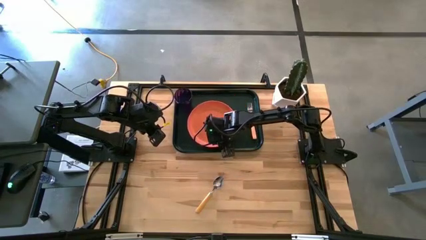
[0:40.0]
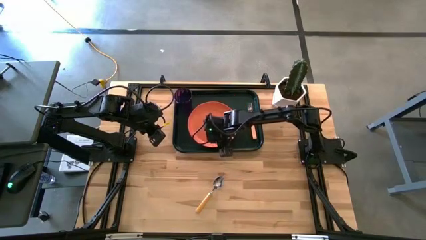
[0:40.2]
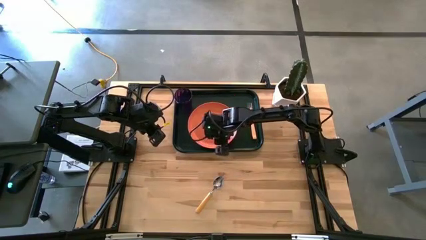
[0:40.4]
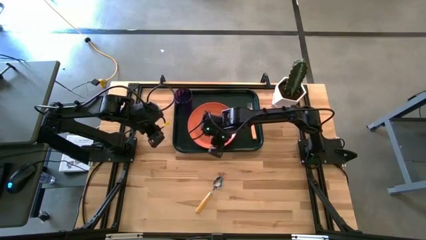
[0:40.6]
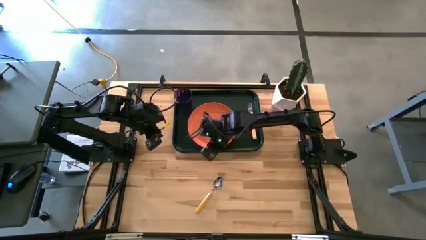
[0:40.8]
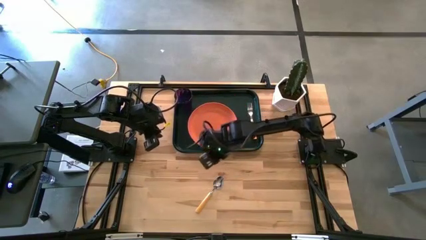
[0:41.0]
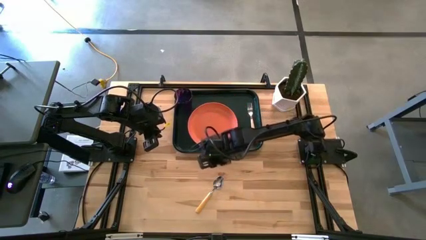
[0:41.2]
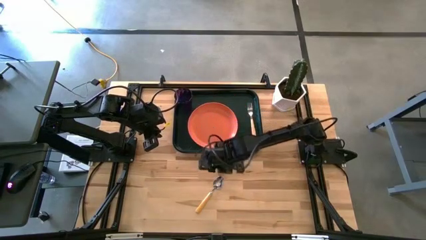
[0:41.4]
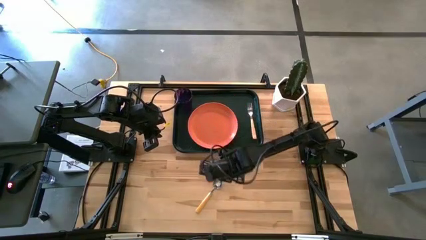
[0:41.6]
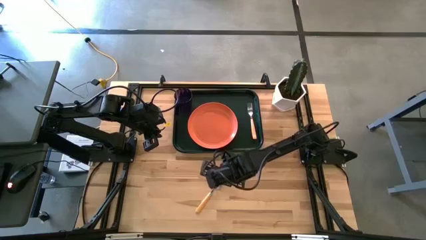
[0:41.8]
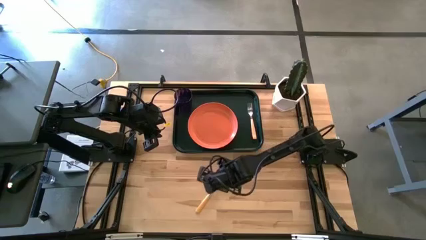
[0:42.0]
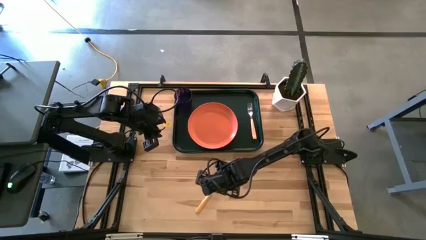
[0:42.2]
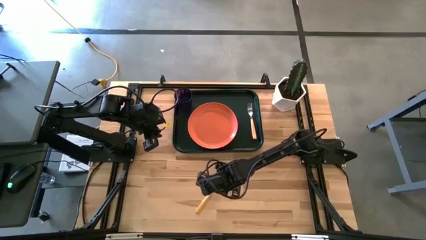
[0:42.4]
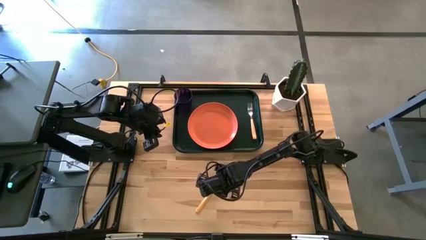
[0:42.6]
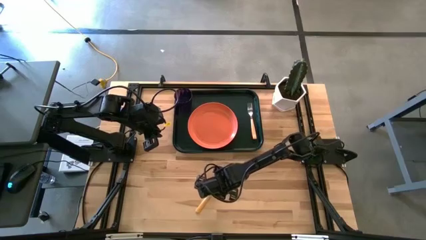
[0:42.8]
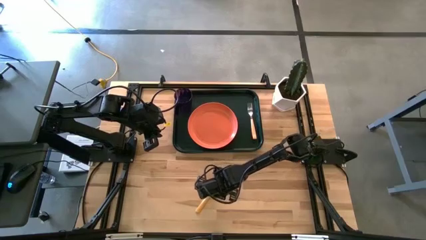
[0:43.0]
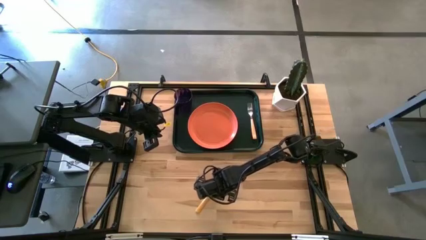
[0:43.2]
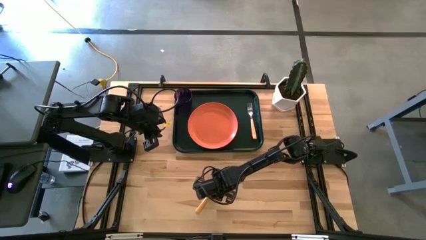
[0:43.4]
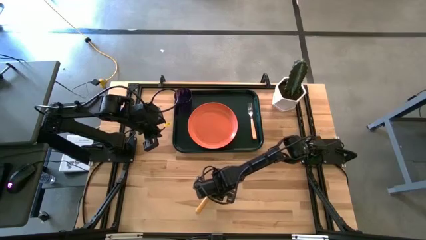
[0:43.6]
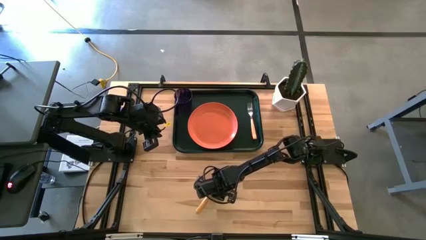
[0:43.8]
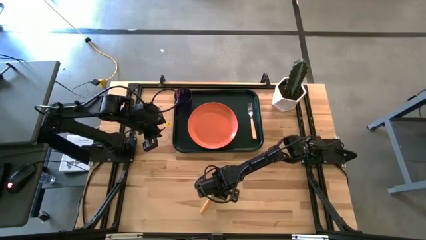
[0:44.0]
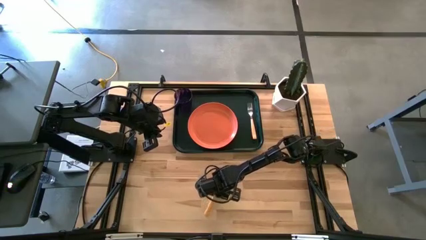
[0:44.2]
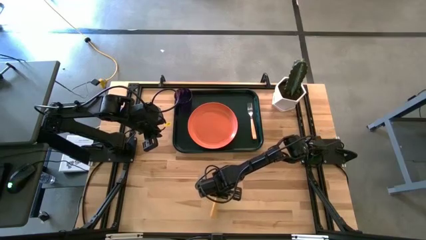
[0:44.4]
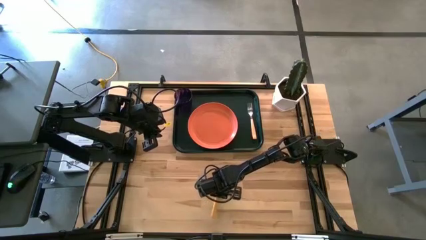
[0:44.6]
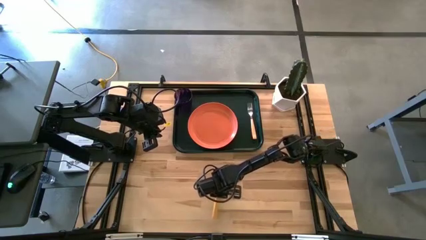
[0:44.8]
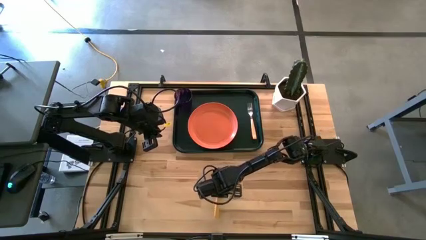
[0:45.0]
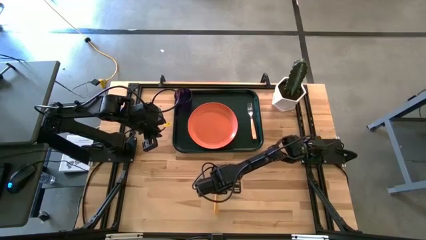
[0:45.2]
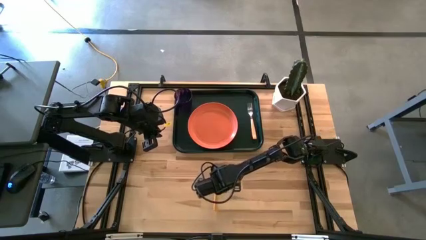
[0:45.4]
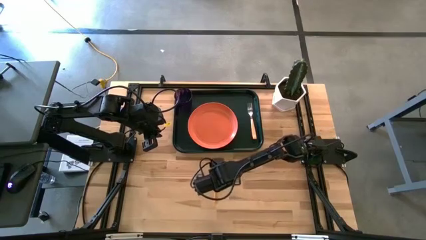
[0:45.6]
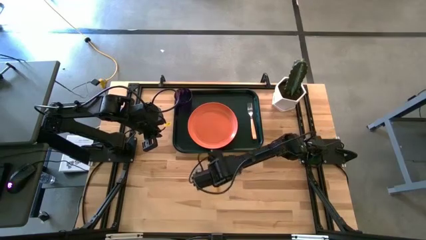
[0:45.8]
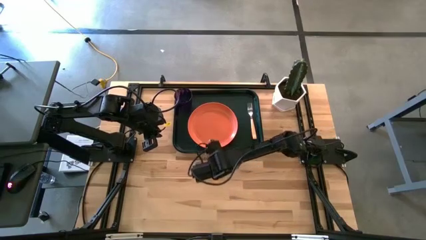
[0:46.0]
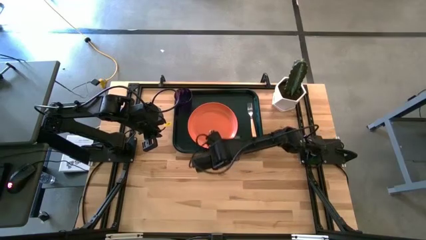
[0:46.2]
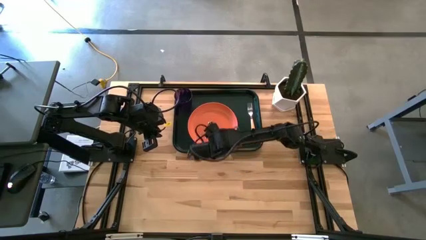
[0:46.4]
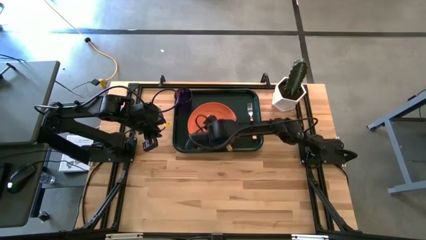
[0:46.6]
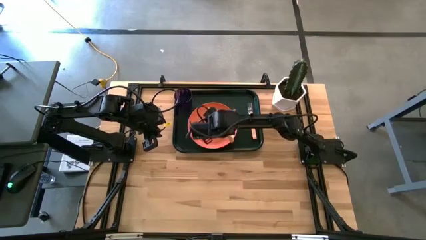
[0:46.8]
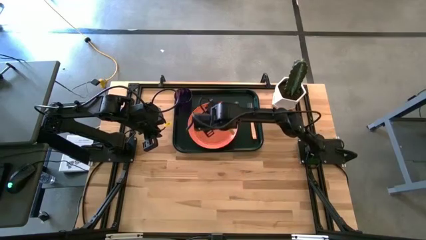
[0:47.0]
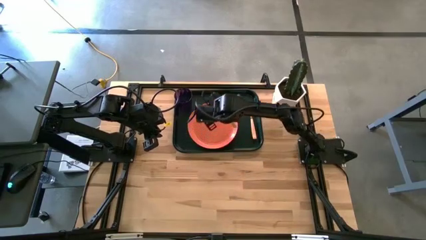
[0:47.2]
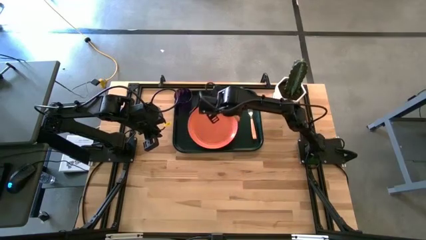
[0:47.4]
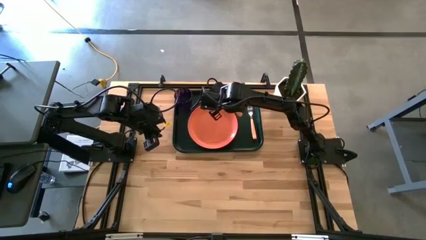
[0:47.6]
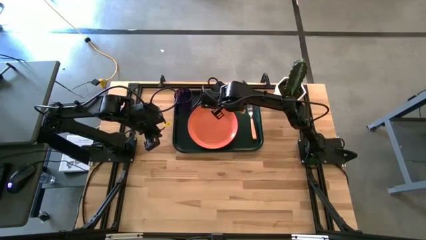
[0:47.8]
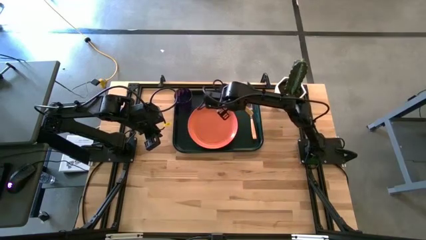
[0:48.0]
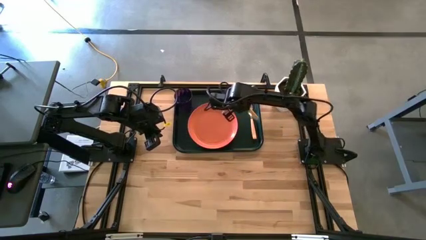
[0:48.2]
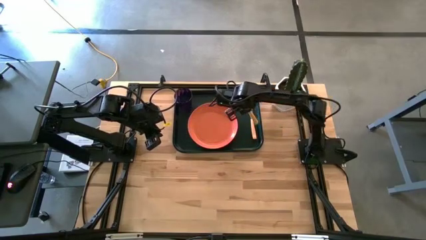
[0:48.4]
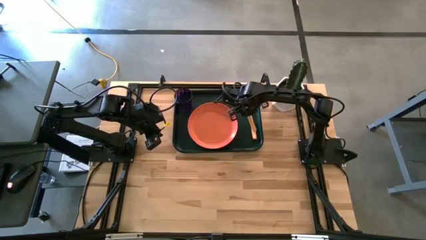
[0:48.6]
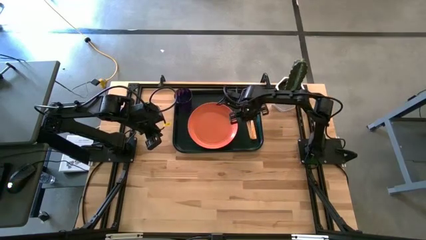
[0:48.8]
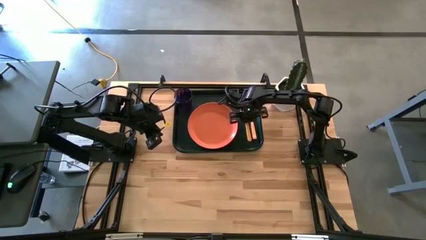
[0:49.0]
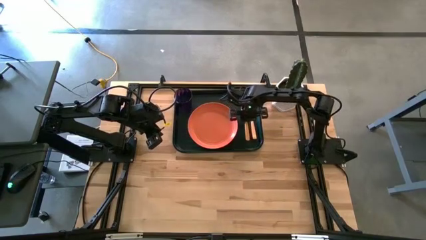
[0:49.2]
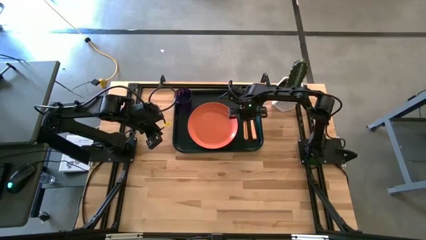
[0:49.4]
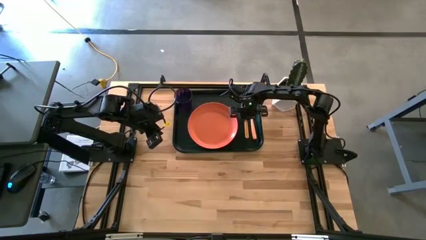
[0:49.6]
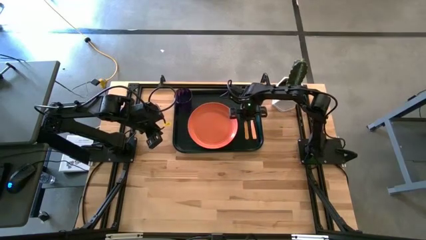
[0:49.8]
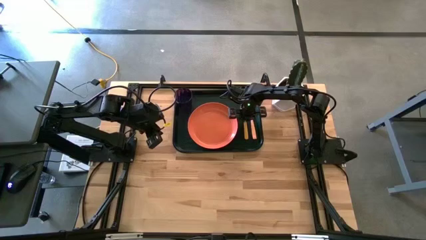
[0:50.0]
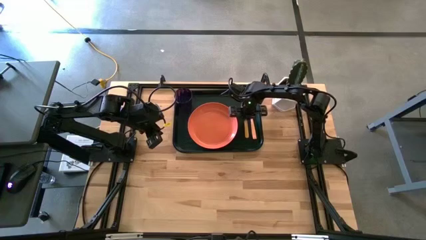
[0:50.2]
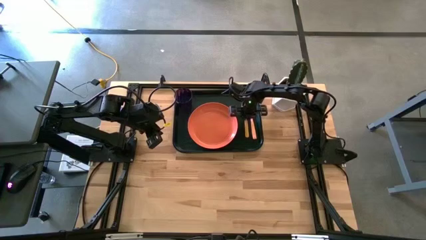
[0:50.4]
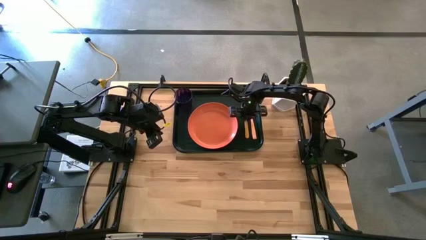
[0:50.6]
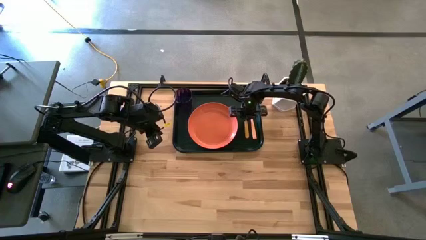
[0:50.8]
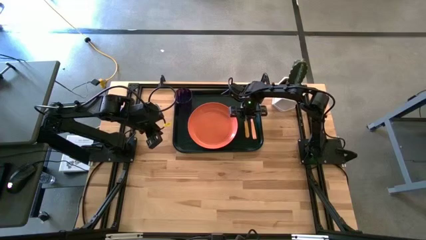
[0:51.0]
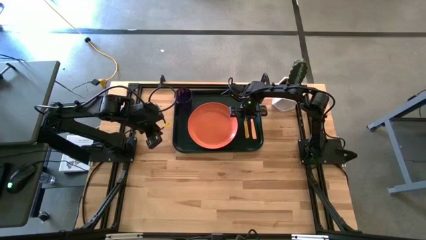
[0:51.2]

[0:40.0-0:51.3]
Task: Pick and place plate/cup/fork/spoon on tray
Put the orange spoon on the right side of the orange plate

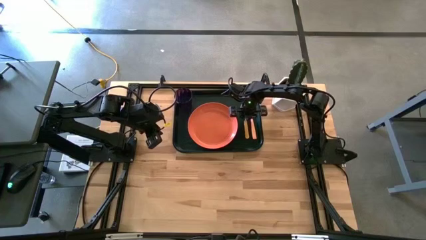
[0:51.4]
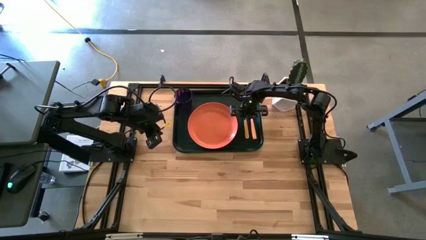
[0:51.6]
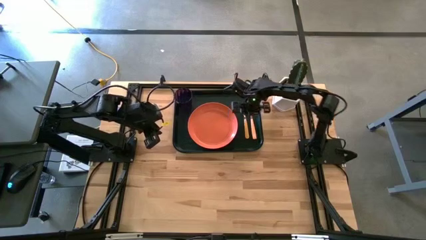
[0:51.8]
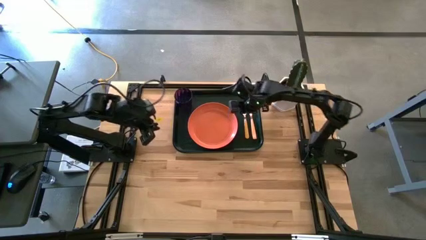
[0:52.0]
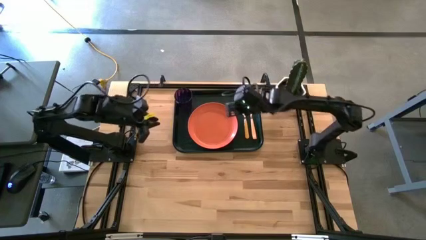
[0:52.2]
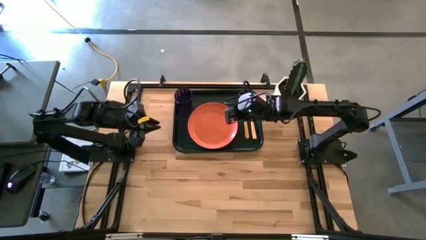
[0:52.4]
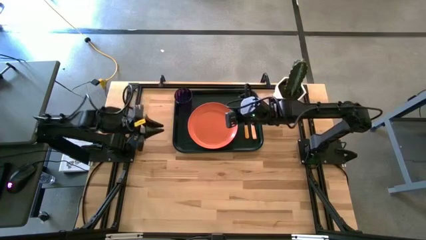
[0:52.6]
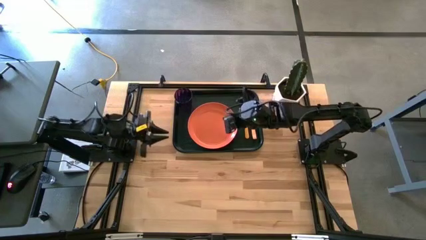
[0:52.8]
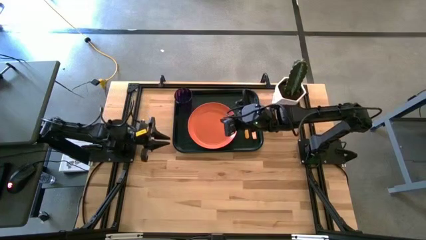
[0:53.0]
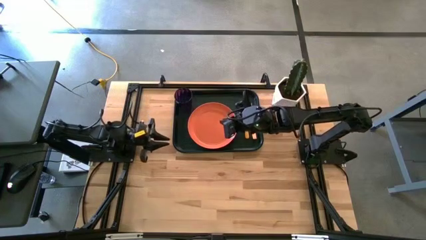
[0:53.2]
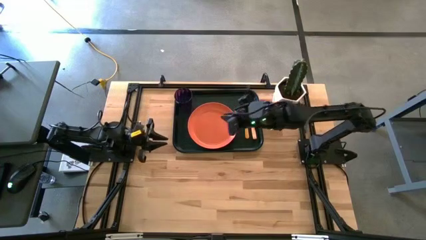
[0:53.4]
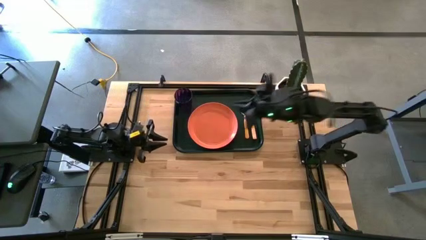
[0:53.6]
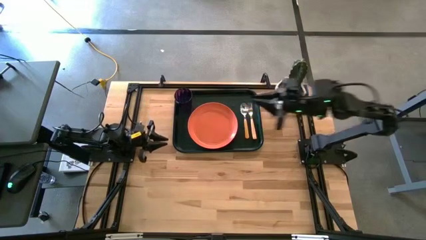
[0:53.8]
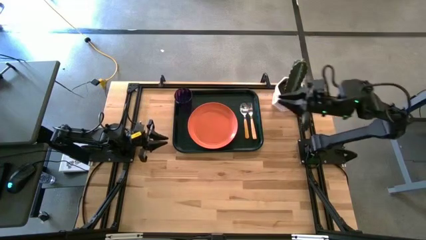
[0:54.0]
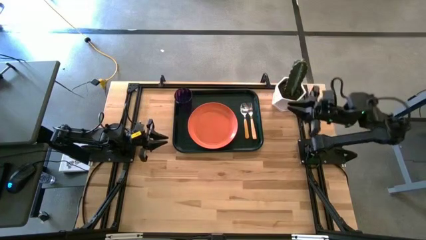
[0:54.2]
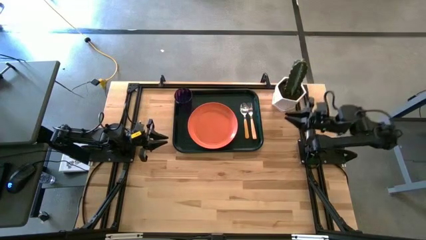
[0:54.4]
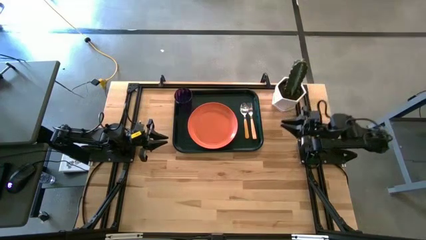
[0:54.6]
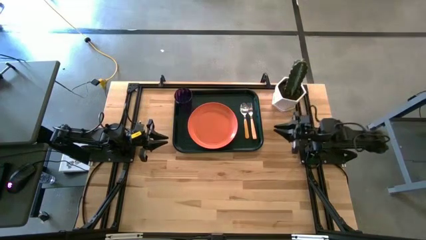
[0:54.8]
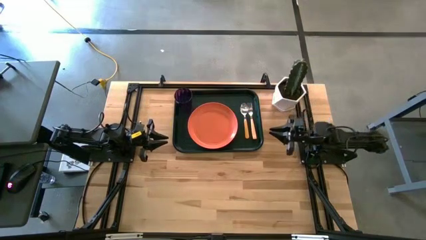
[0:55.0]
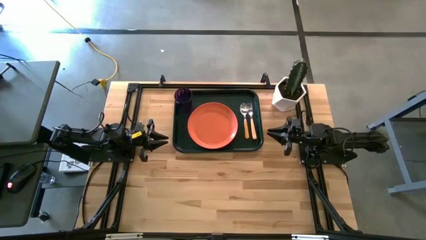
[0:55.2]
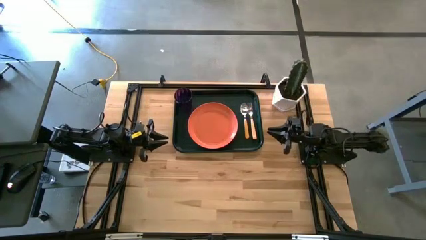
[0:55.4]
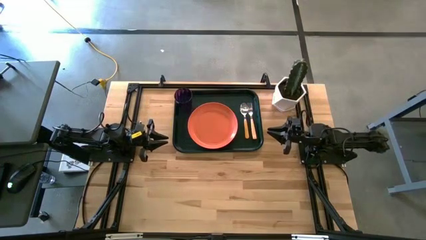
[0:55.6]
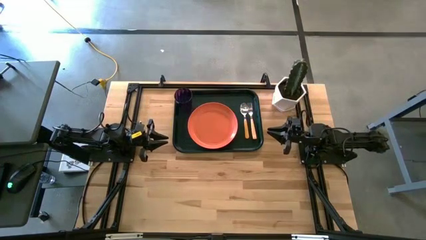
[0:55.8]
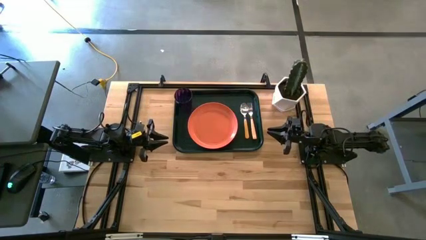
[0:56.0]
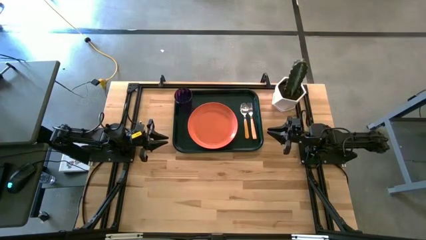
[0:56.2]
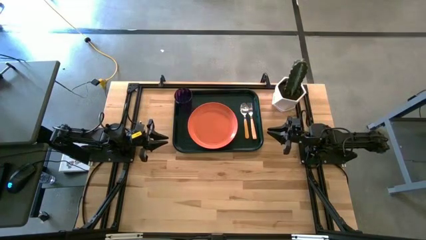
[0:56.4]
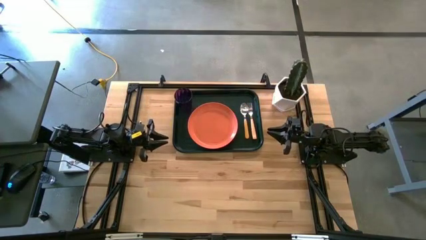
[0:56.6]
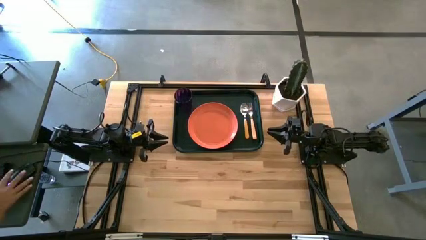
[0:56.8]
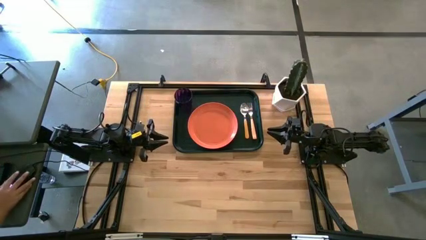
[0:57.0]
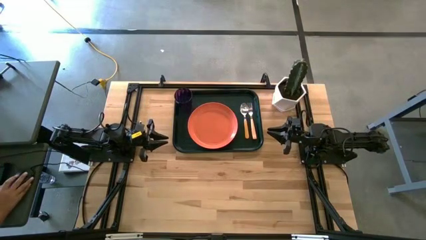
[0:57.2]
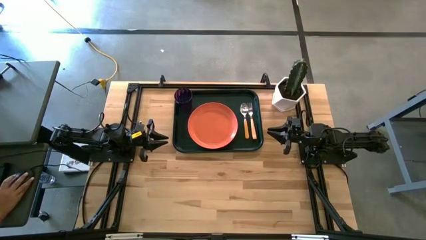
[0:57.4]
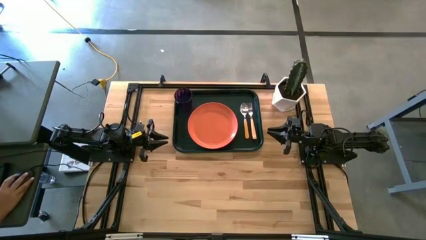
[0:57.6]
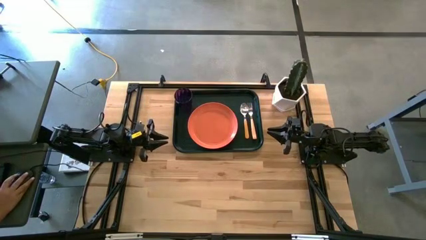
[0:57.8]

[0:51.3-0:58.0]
Return to Home Position
